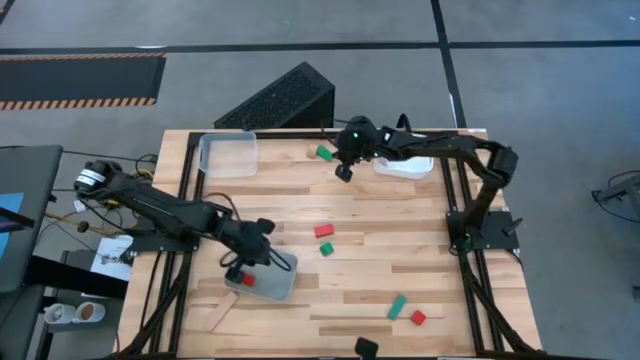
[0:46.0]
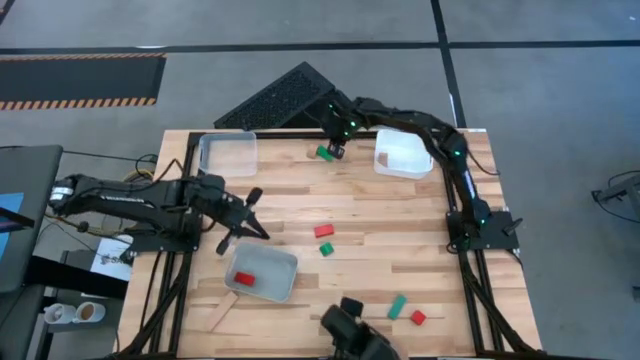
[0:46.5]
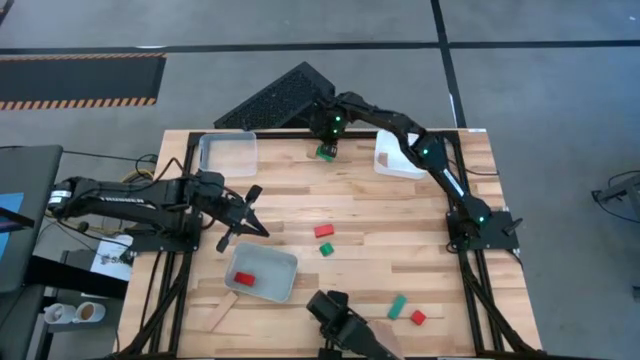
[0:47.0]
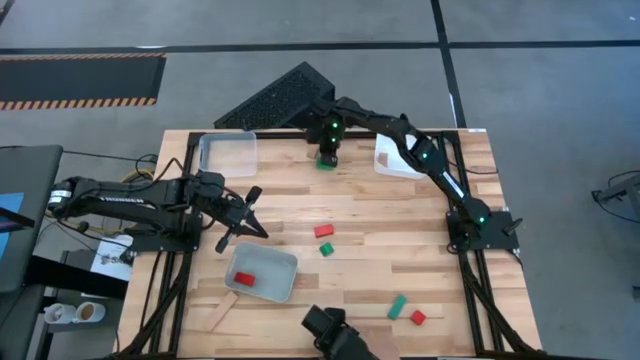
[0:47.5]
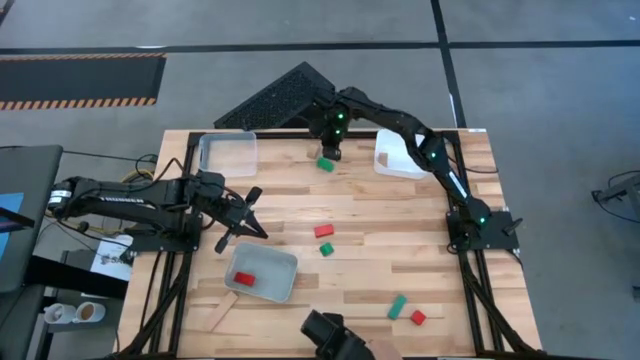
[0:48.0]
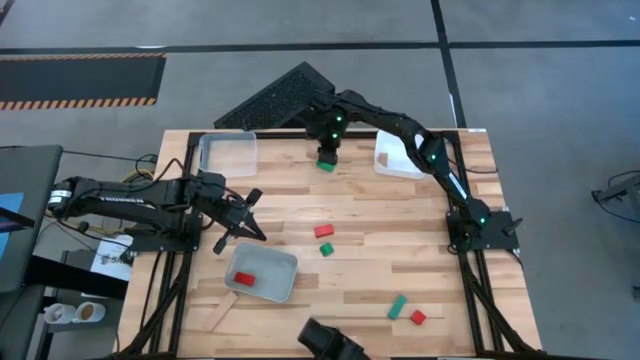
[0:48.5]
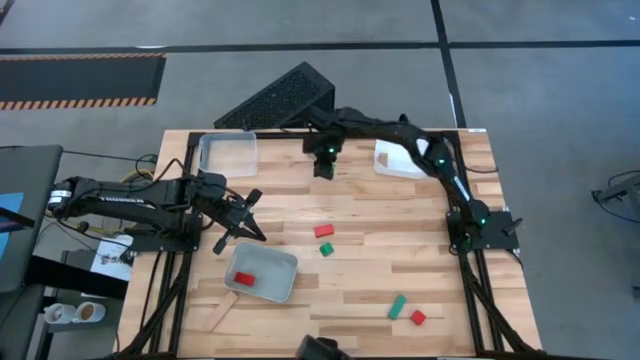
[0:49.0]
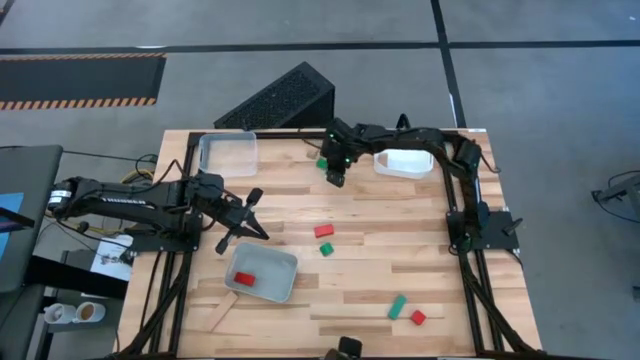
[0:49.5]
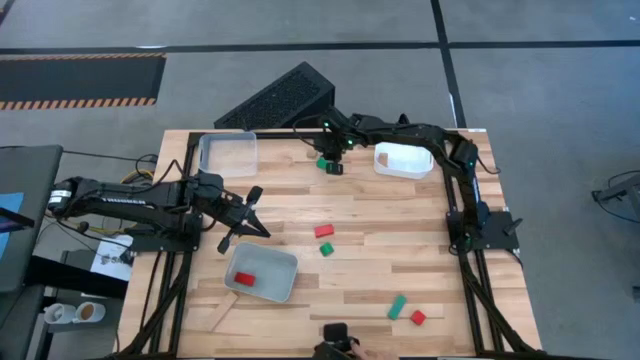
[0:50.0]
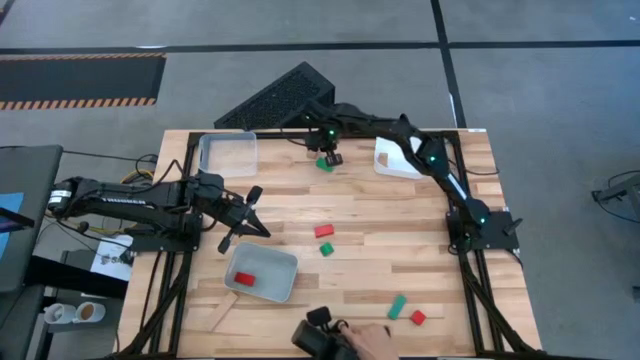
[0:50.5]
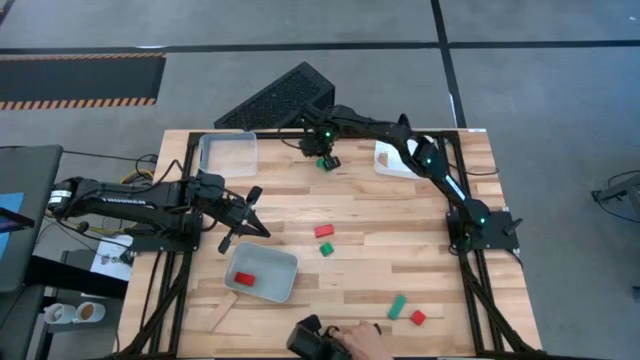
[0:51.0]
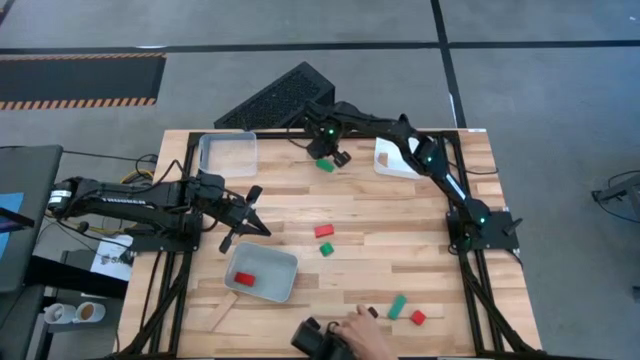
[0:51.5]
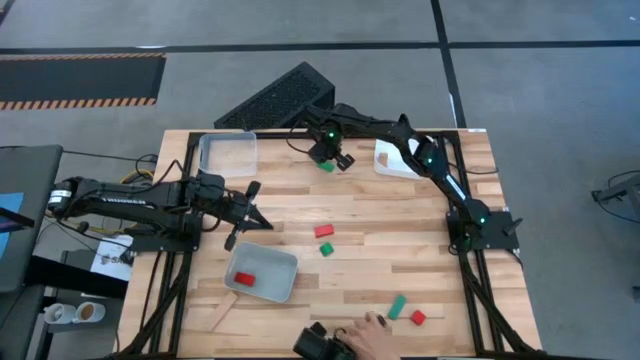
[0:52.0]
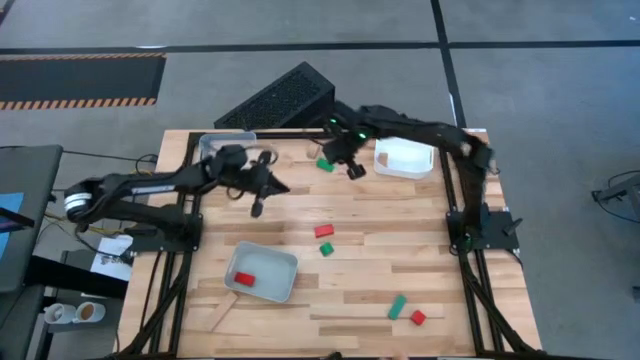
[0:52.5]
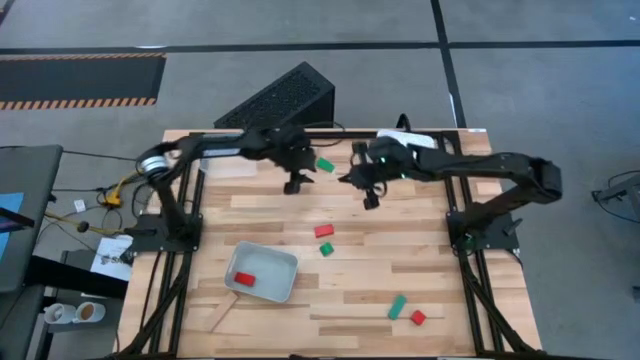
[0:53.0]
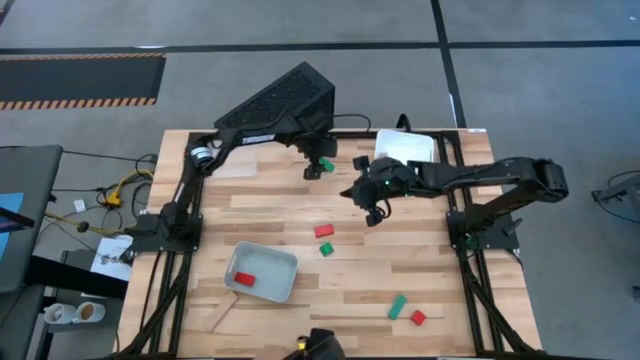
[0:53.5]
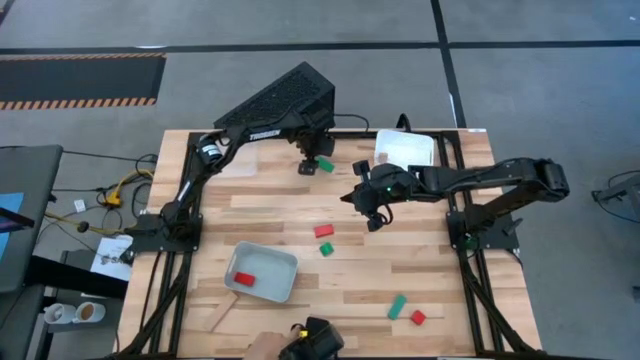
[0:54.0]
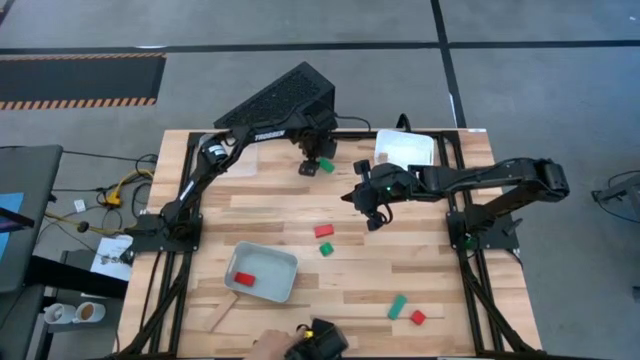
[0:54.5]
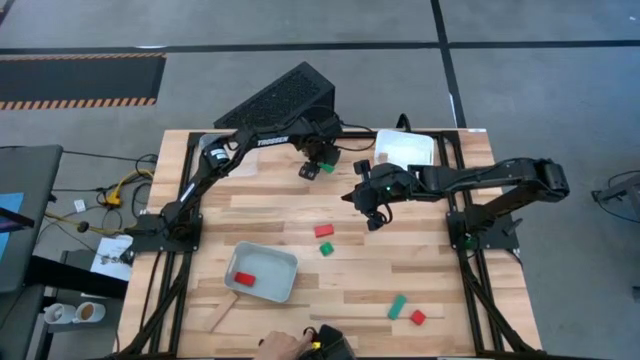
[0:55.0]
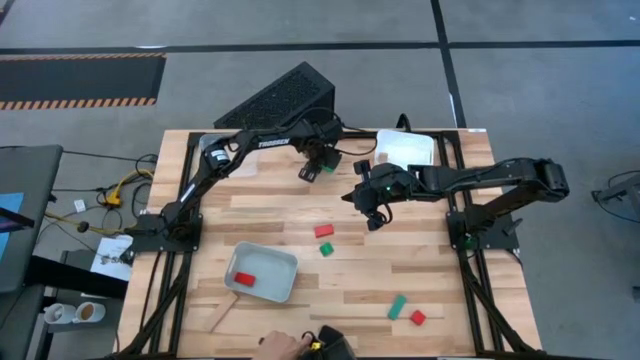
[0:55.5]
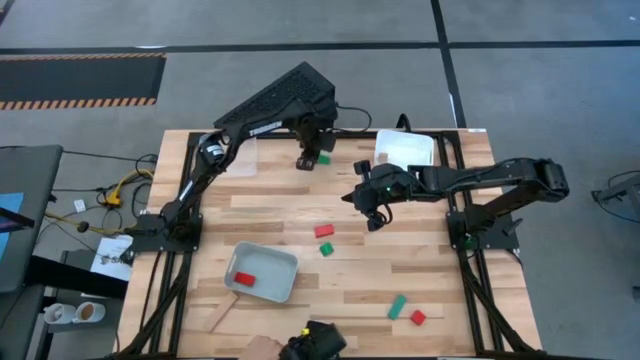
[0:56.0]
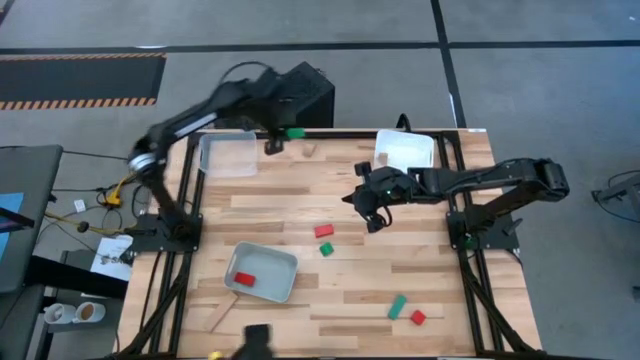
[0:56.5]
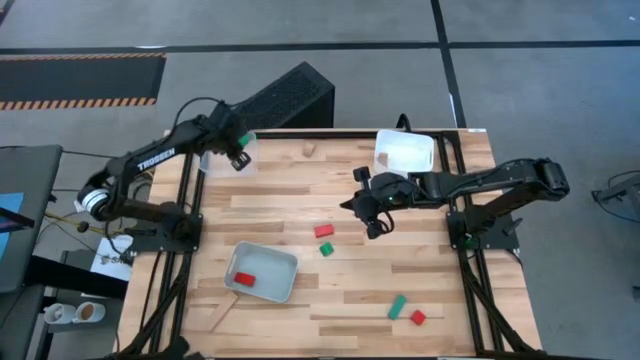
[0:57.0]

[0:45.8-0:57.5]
Task: Sort & place blocks by color
Put the top green block into the transparent bin

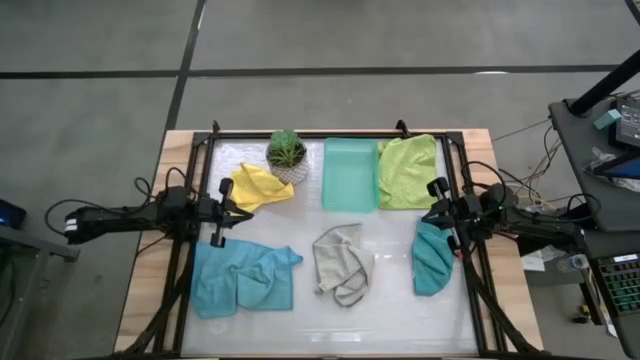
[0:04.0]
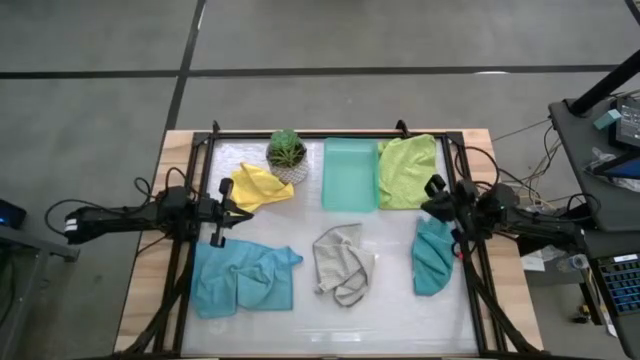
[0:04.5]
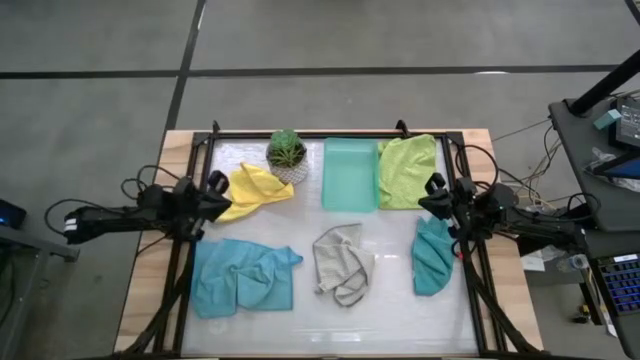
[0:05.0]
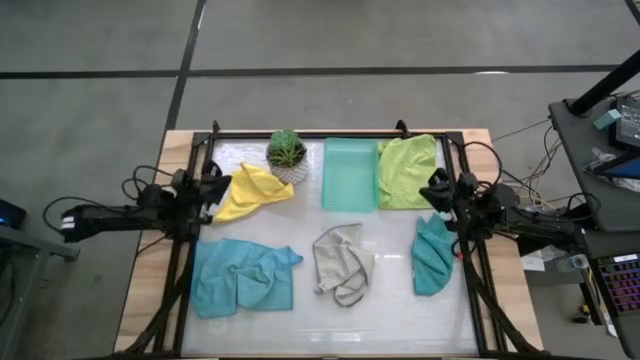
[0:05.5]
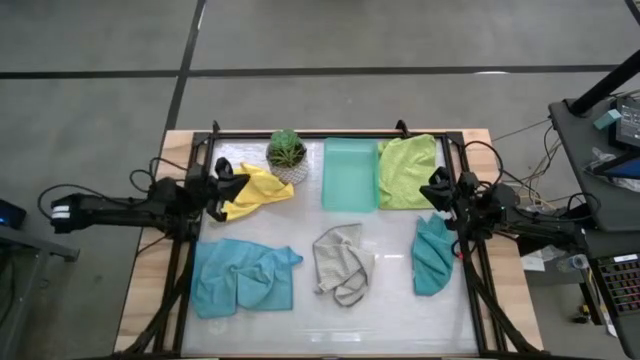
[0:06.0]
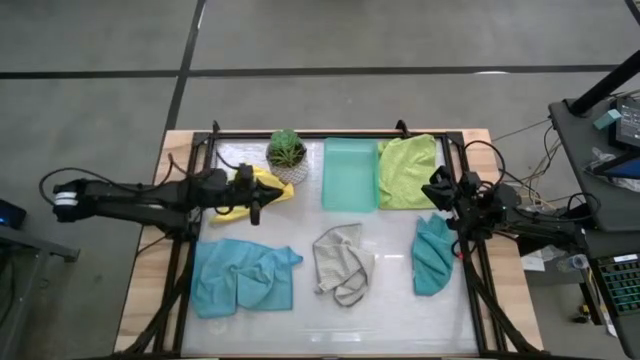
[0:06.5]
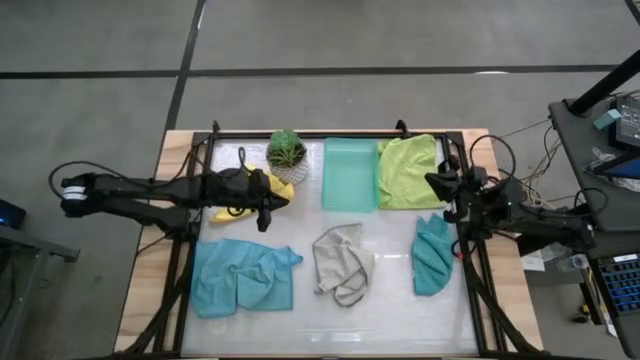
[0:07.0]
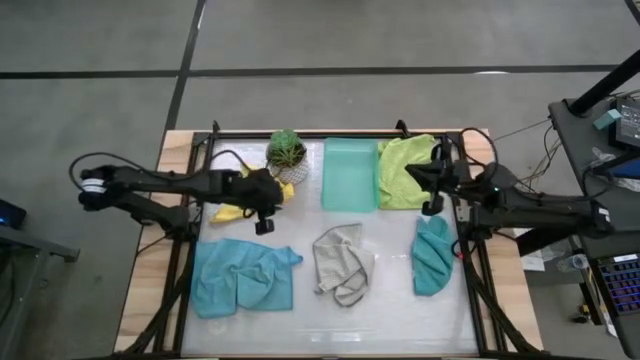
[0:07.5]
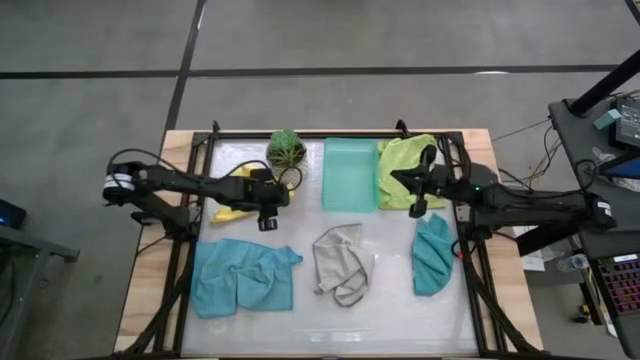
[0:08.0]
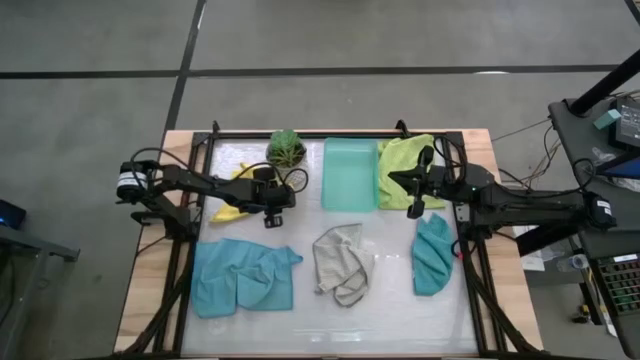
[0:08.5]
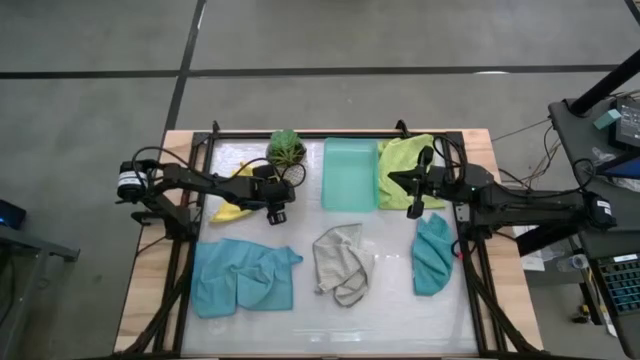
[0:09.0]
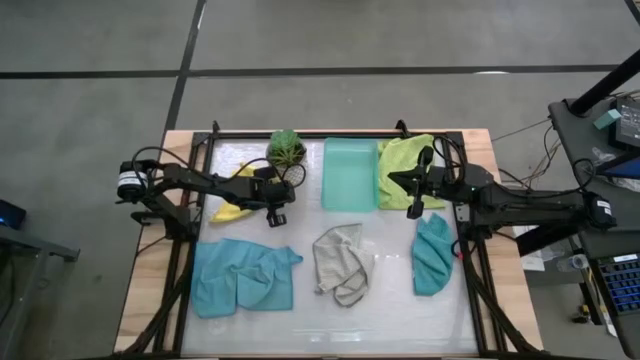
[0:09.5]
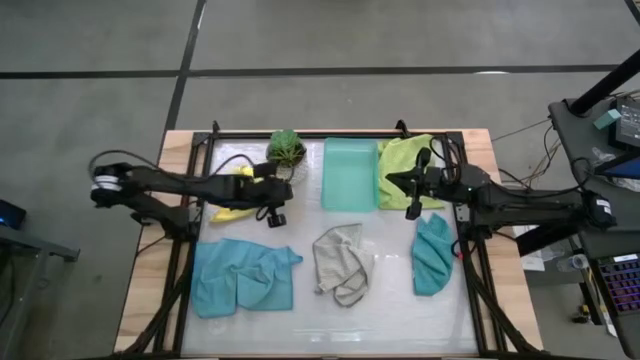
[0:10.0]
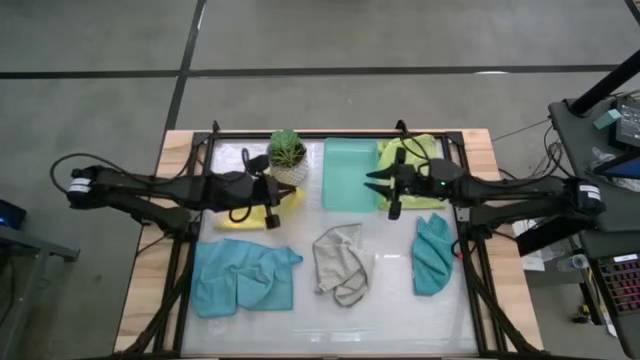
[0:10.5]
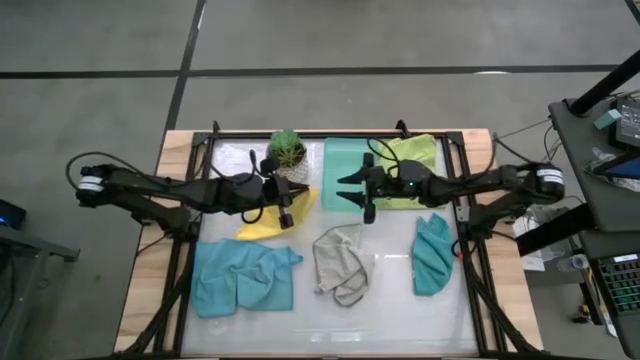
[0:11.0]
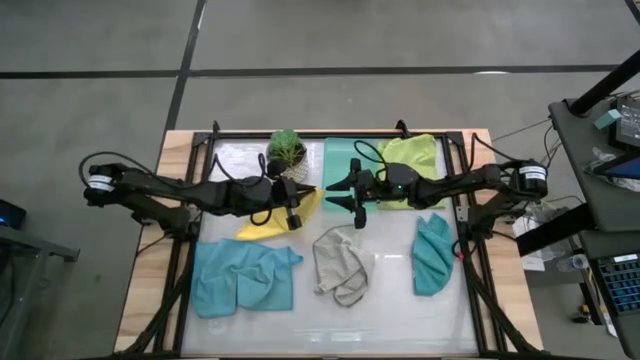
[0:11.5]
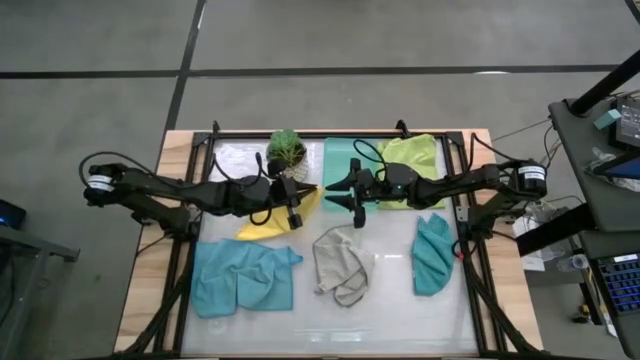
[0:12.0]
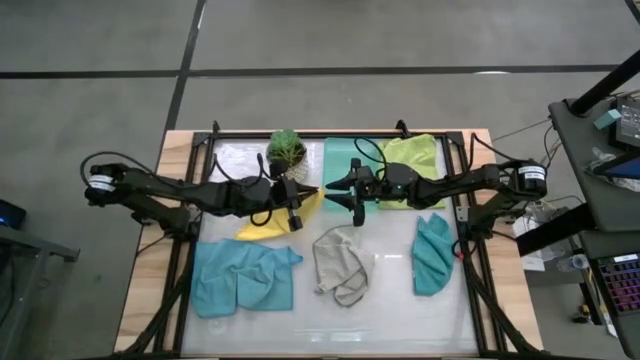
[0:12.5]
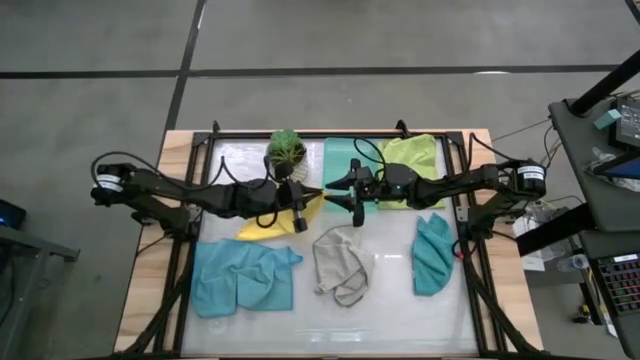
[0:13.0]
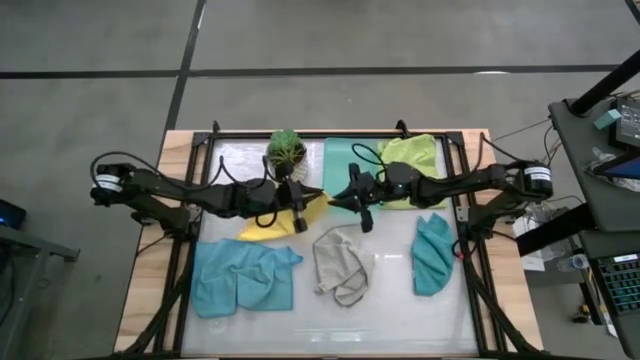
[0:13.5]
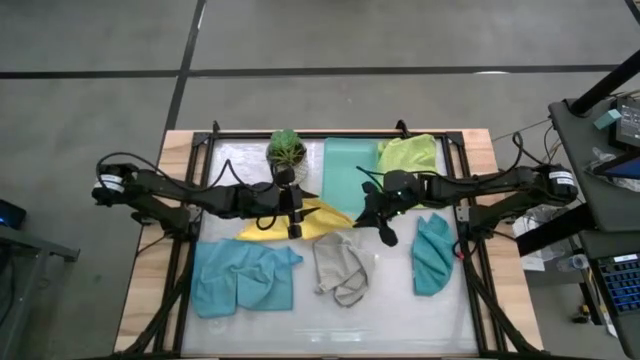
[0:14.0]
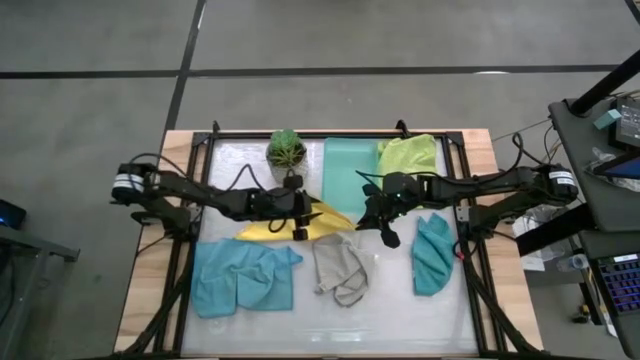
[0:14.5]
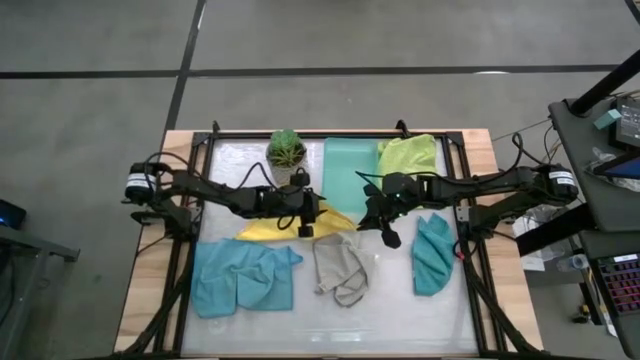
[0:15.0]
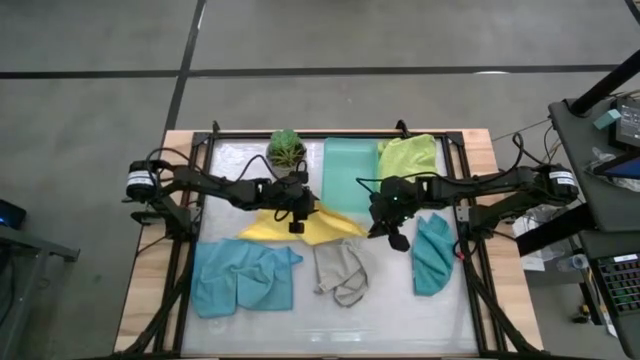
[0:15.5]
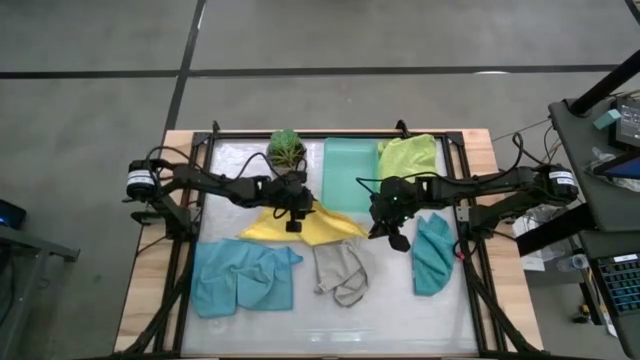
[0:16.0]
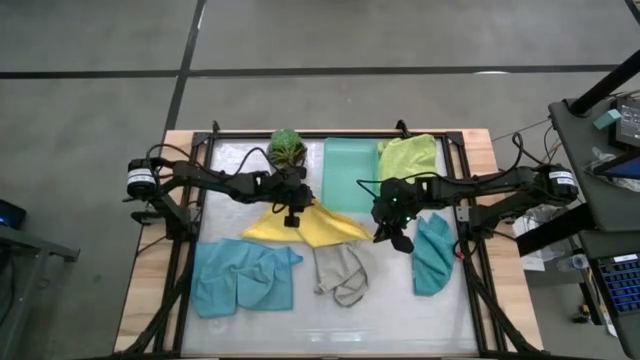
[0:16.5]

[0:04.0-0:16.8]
Task: Fold microfiber towels
Fold the yellow microfiber cloth
